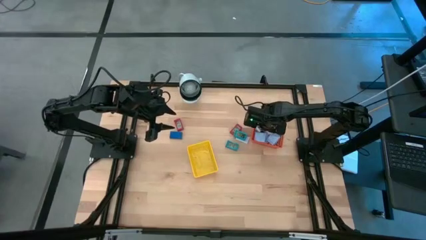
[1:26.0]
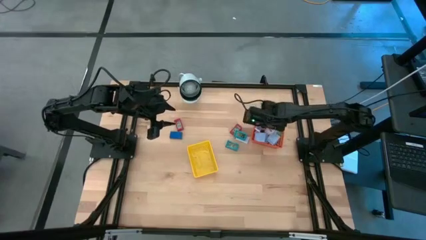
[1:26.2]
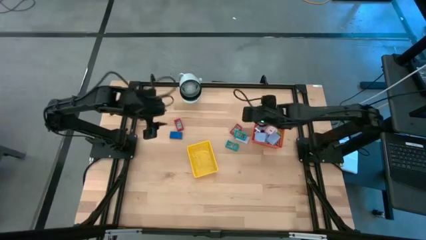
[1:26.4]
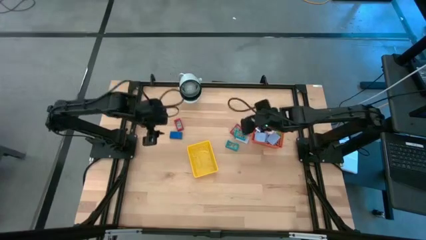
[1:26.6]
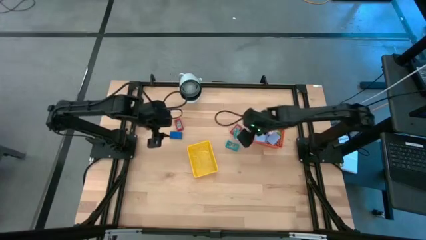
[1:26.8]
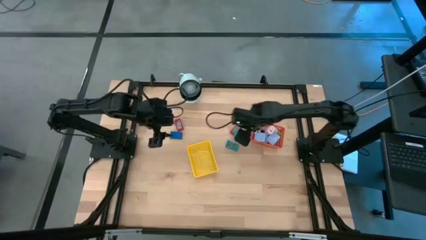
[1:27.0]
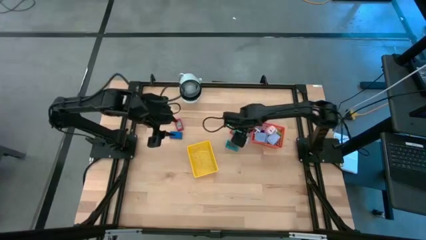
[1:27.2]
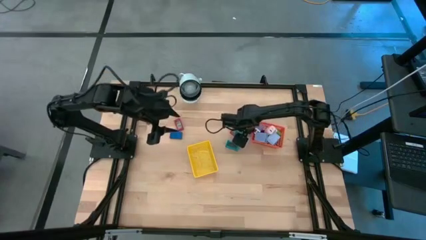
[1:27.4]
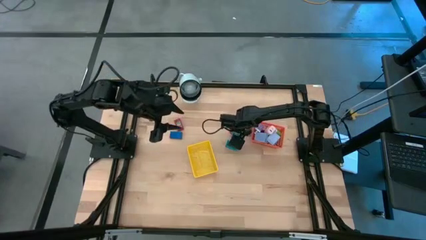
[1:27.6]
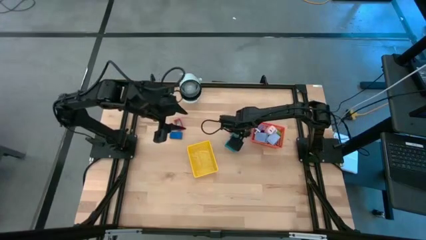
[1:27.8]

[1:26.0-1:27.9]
Task: Pick & Place Office items
Put the top light blue digital clock into the yellow basket

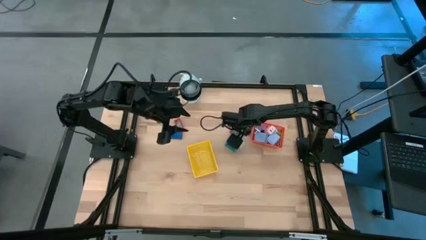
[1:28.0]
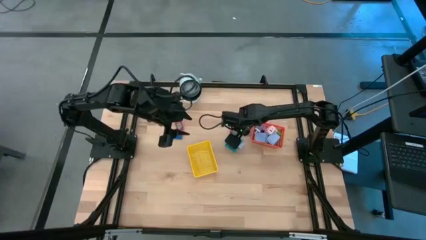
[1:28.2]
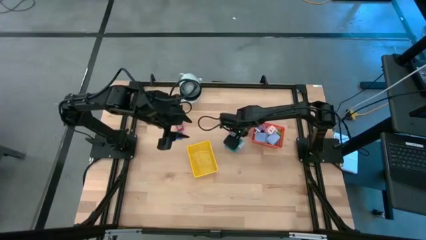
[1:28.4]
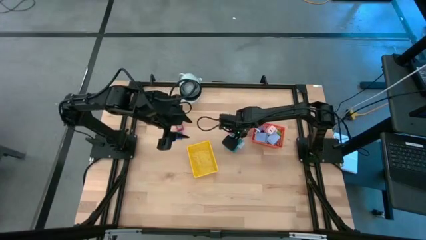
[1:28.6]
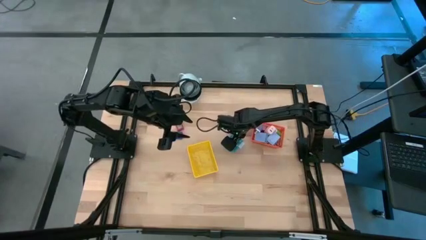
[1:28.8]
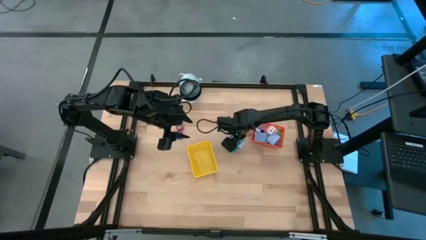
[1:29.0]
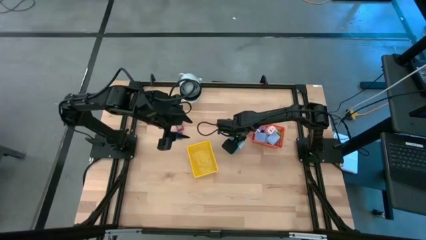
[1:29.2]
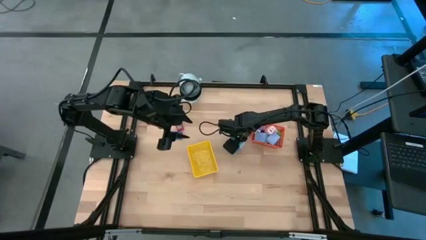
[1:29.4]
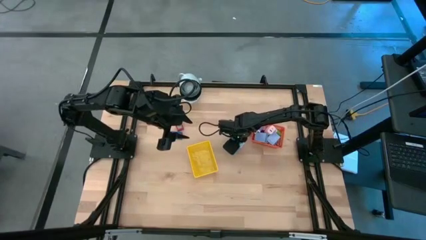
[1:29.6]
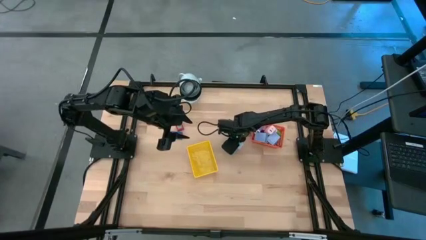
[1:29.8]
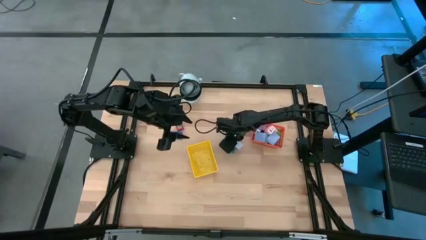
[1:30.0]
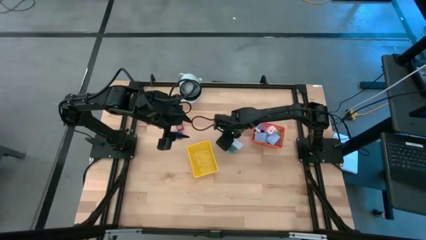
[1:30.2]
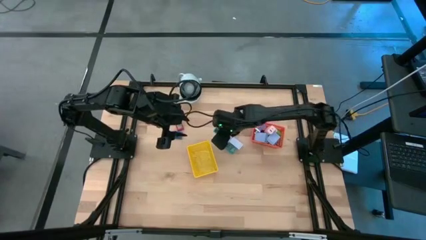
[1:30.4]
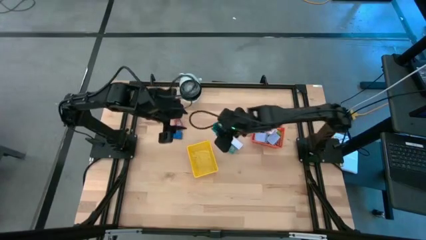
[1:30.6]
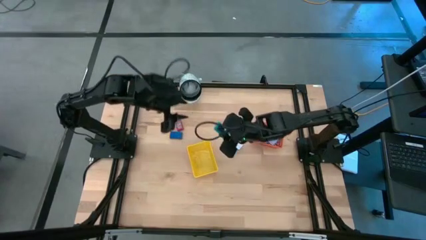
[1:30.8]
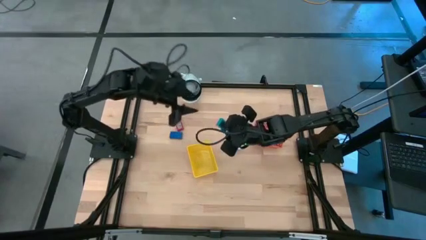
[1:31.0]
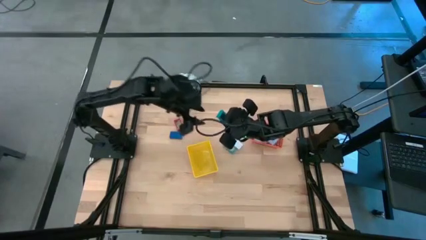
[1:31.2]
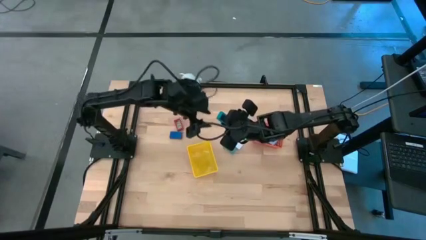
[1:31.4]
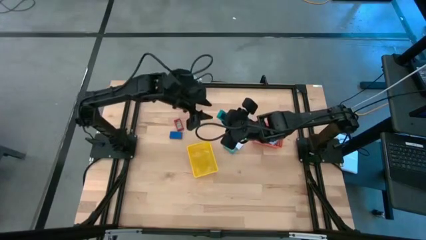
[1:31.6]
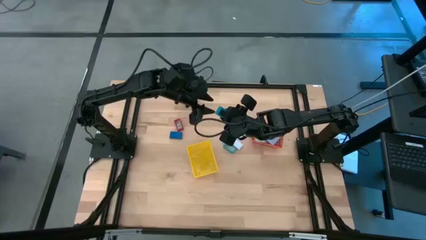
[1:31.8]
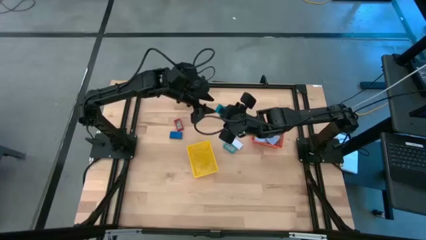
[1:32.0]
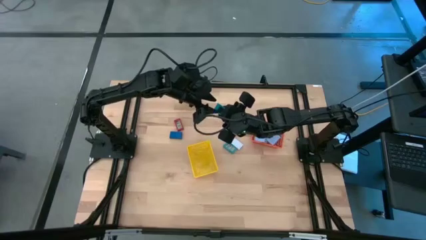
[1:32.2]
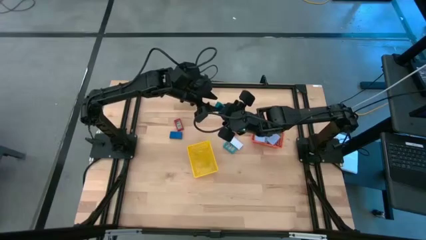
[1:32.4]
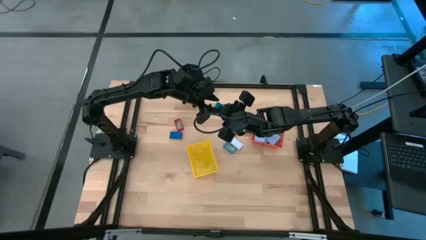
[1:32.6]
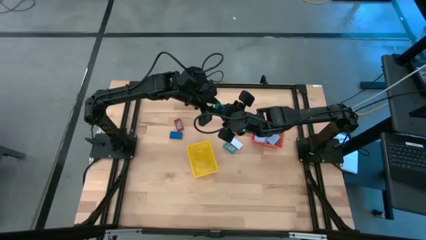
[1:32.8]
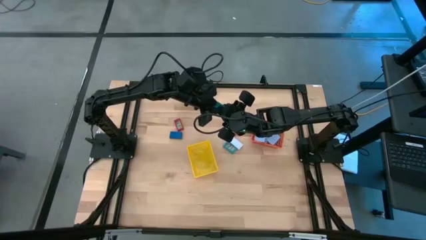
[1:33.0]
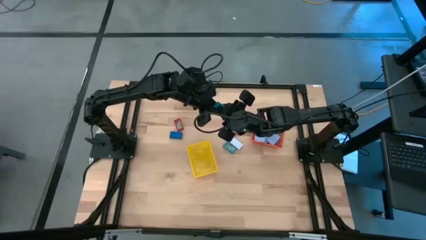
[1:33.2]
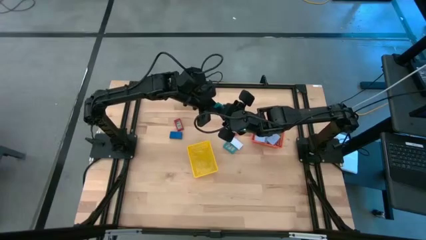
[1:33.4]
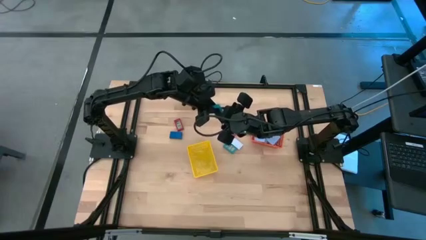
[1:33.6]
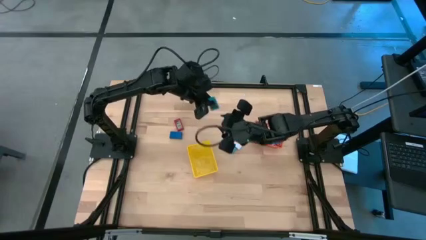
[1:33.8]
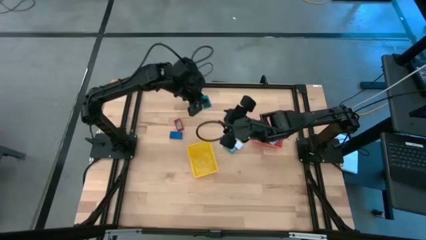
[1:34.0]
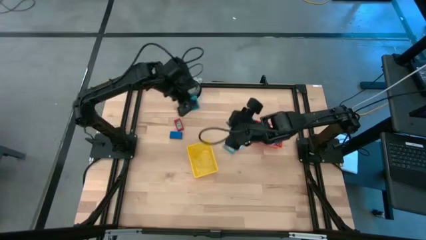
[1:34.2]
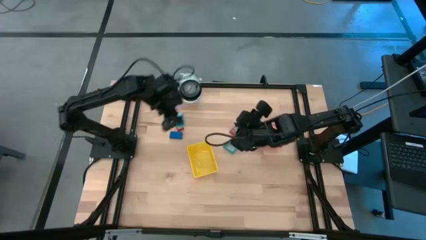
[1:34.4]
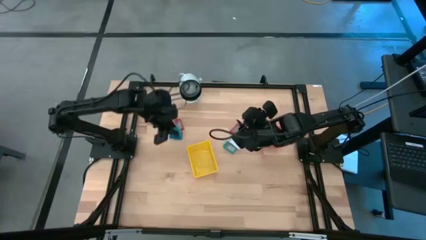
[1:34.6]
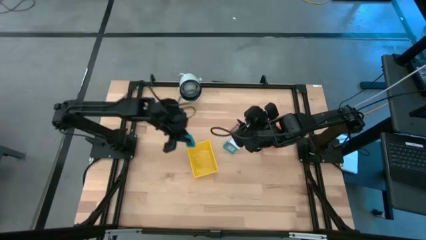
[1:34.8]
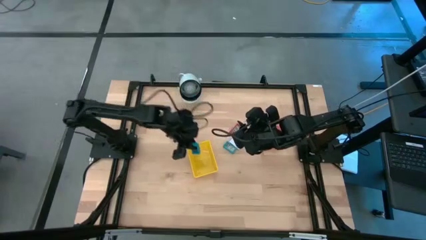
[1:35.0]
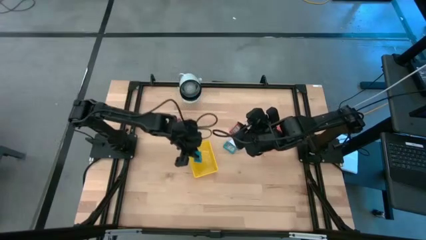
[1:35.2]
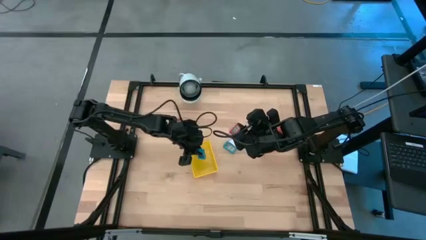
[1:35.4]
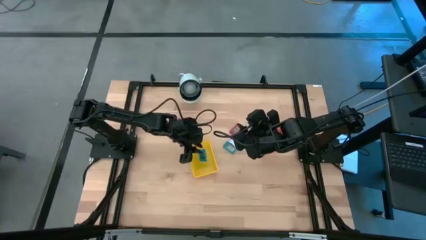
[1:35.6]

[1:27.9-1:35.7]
Put the top light blue digital clock into the yellow basket

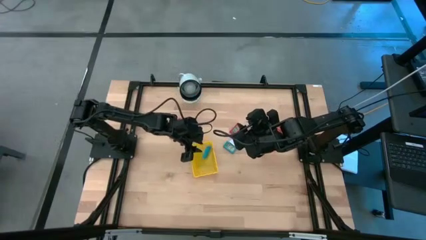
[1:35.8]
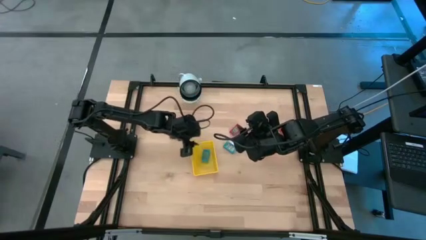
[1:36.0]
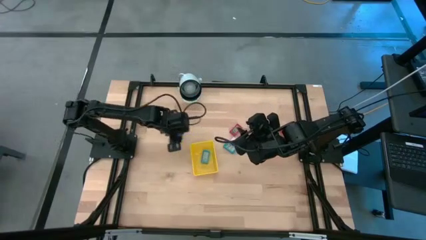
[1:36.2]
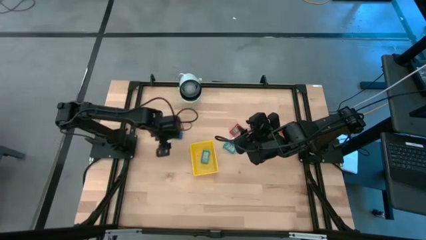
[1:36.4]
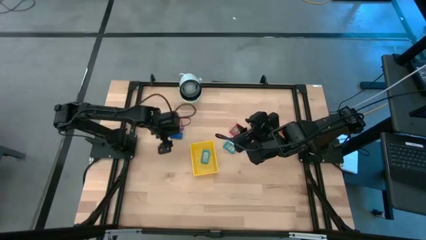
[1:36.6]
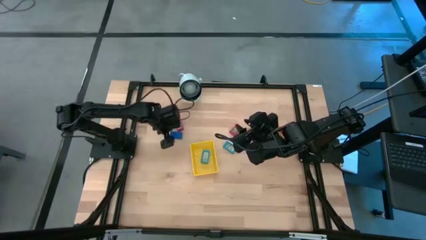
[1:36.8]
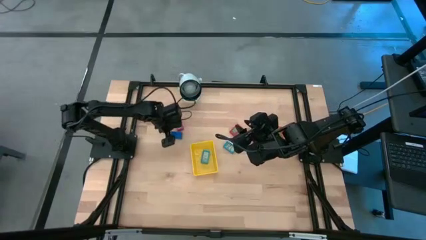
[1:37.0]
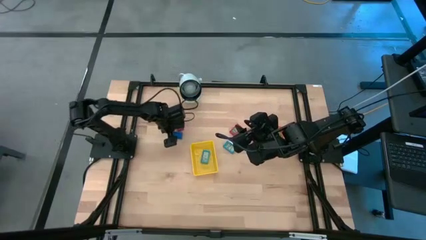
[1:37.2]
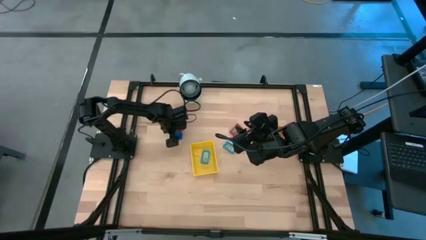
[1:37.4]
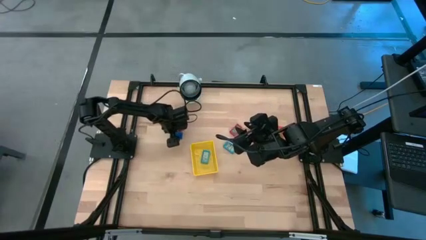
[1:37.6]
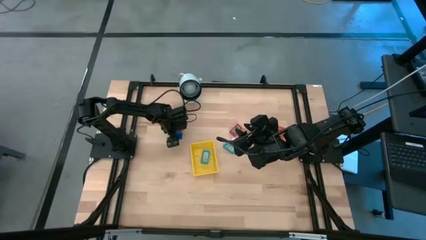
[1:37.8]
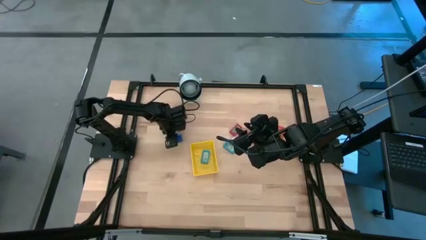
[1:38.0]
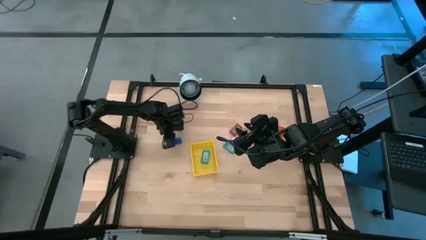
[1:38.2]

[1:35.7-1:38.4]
Put the blue digital clock into the yellow basket

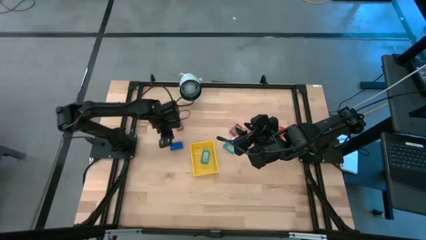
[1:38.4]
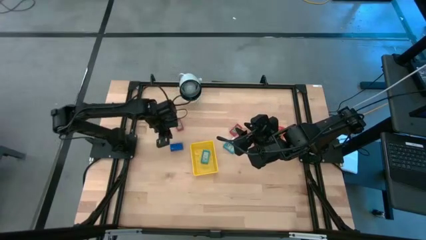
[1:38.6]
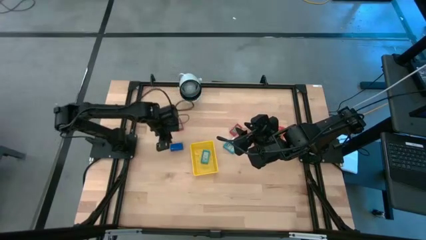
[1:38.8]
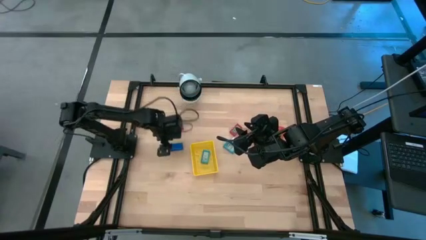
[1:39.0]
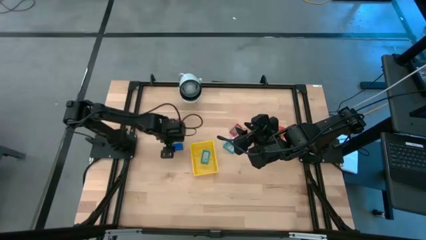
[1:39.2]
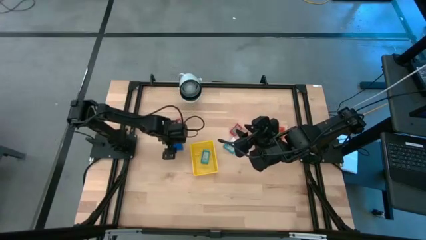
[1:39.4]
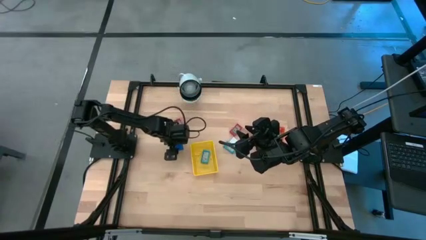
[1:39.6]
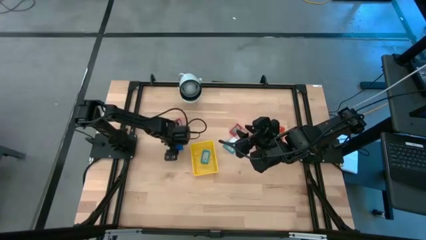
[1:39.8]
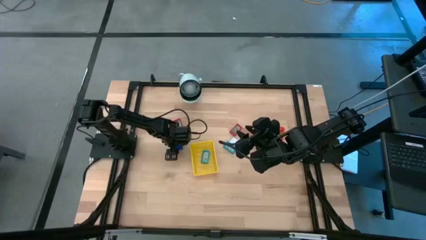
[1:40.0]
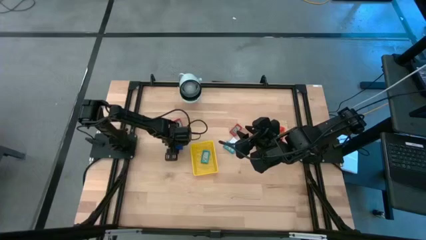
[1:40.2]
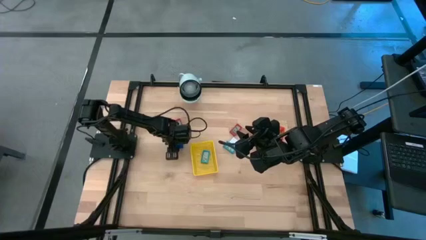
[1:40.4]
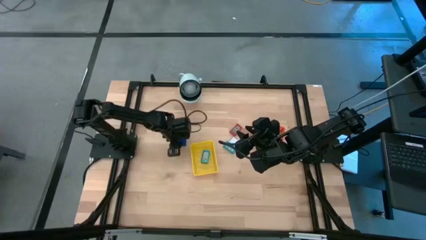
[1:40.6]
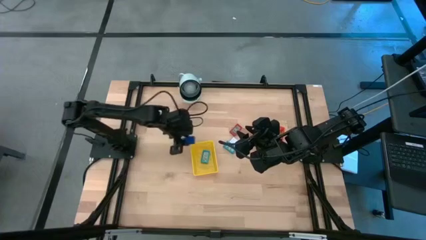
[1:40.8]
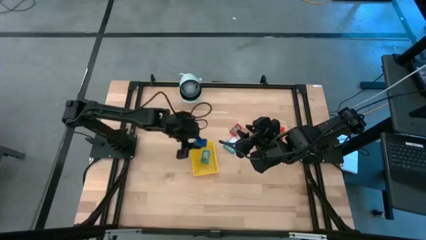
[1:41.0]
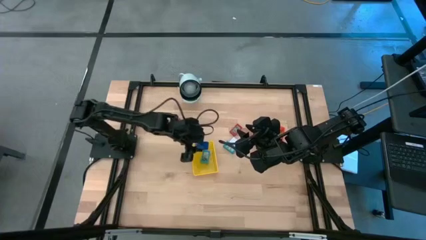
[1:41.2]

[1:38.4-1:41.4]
Put the blue digital clock into the yellow basket

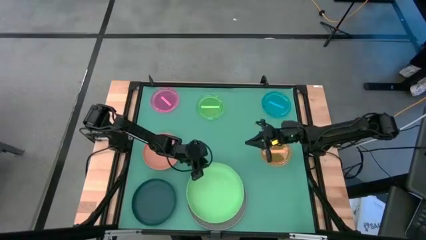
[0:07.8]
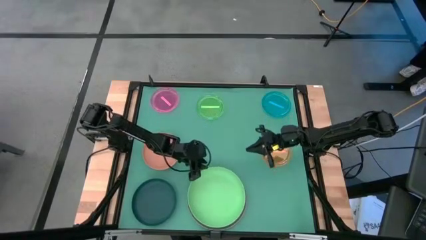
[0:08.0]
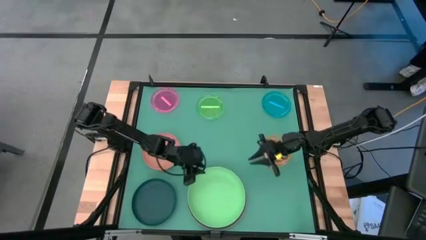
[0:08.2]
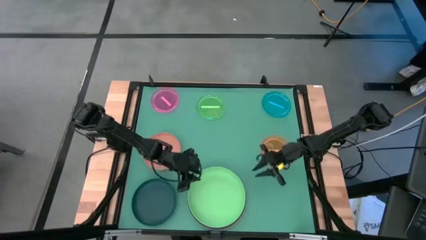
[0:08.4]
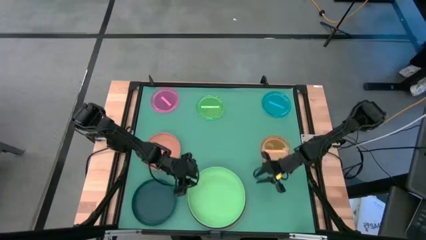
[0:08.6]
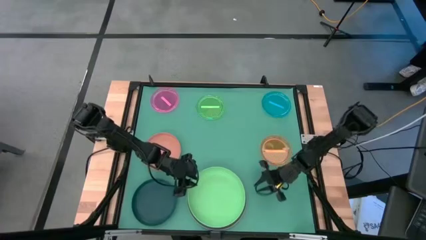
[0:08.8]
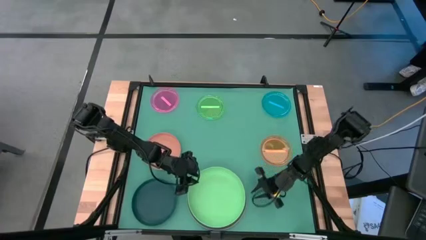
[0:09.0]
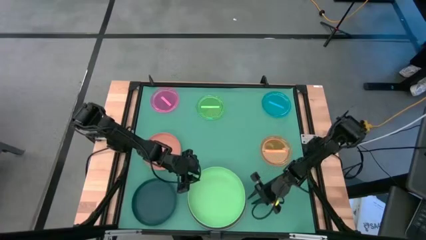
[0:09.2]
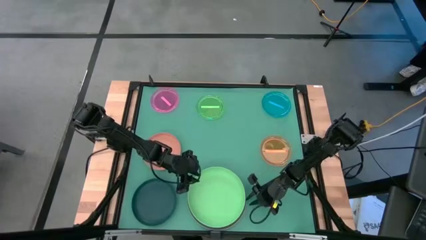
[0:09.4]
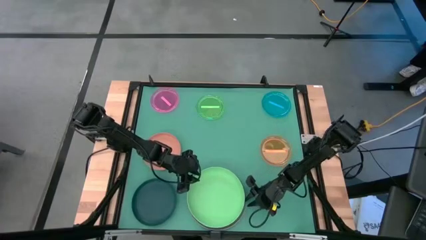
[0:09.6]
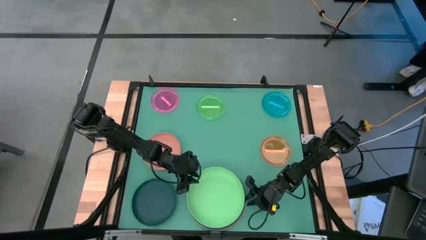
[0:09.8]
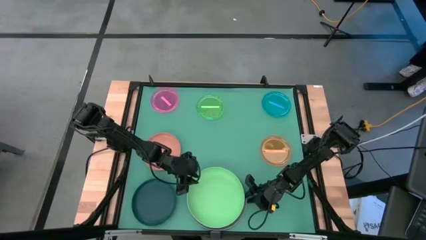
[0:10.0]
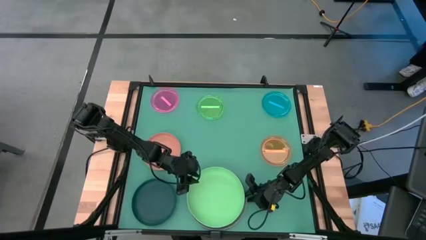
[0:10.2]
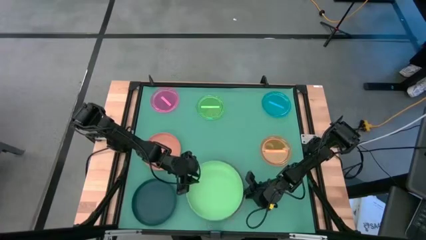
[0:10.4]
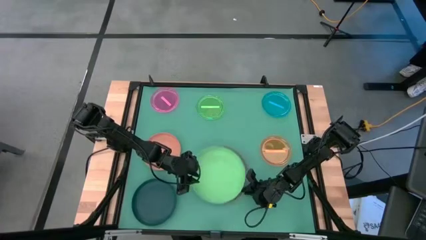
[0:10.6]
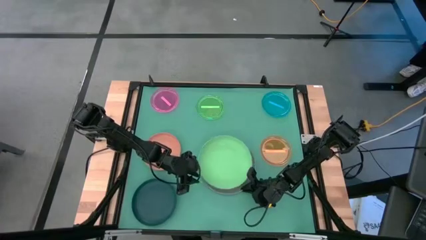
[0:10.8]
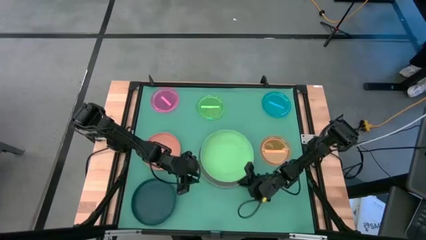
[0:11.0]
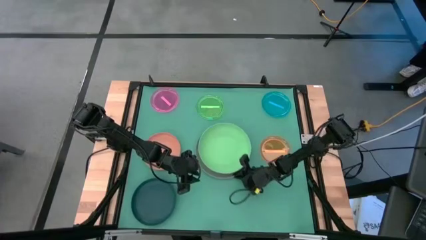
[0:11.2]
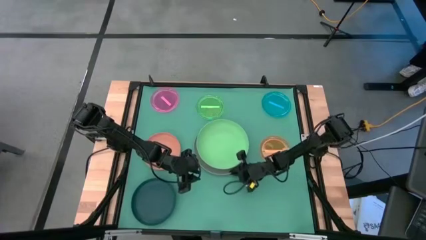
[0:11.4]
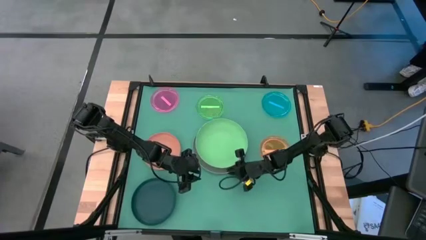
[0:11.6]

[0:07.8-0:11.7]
Task: Stack plastic plates
Move the stacked plates to the center of the table
